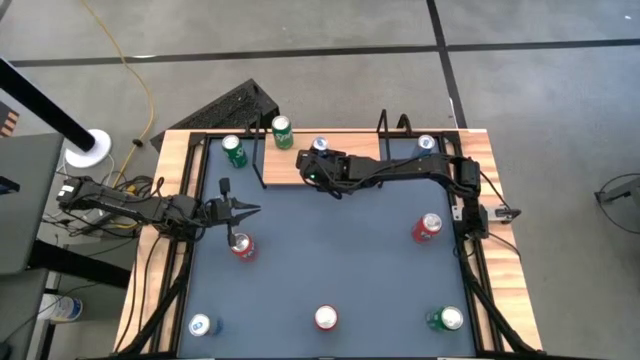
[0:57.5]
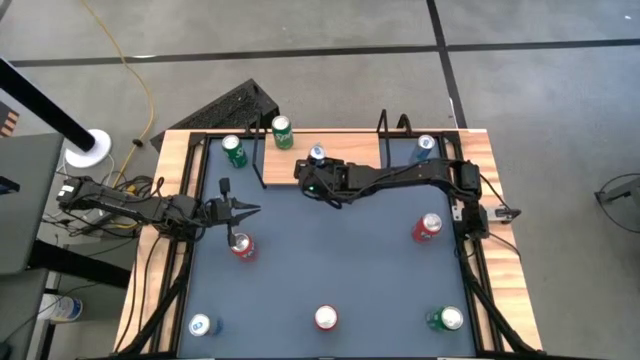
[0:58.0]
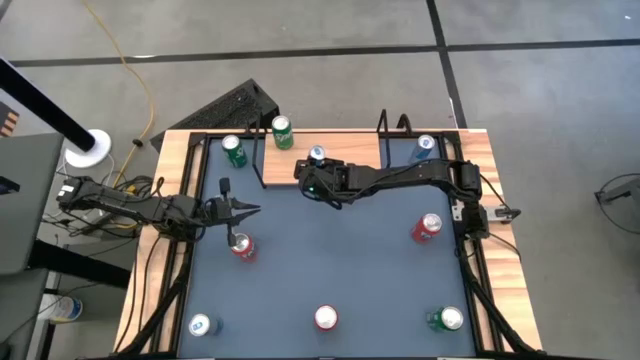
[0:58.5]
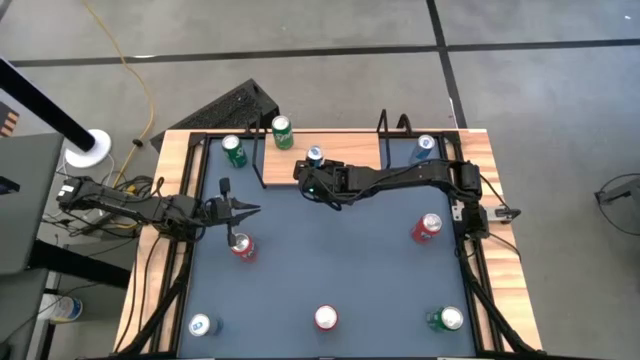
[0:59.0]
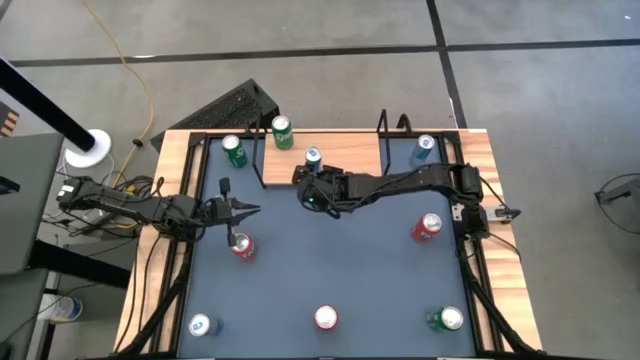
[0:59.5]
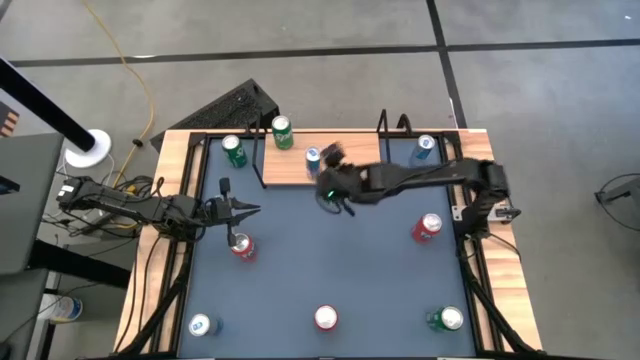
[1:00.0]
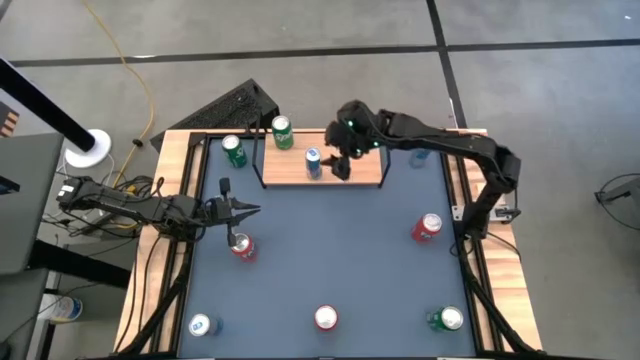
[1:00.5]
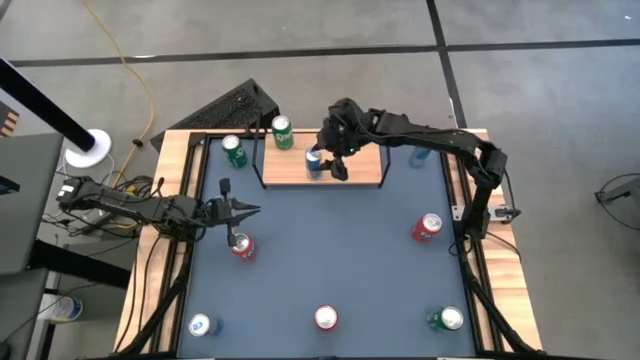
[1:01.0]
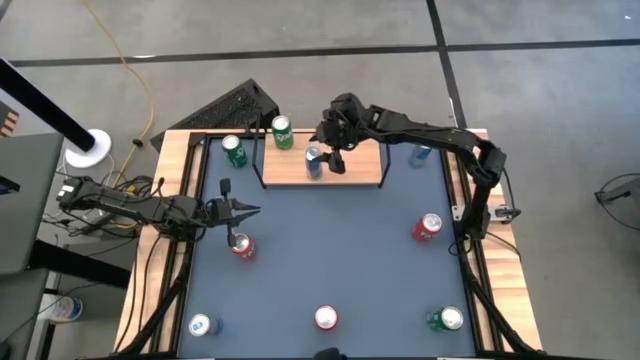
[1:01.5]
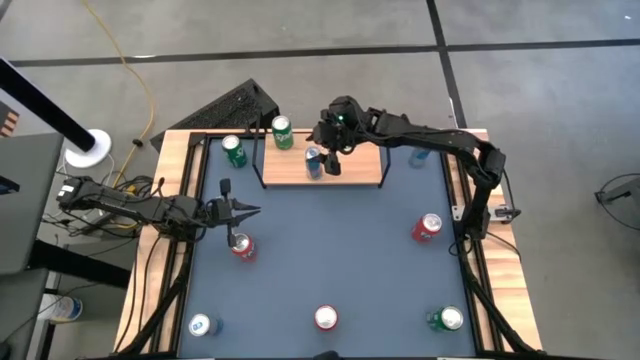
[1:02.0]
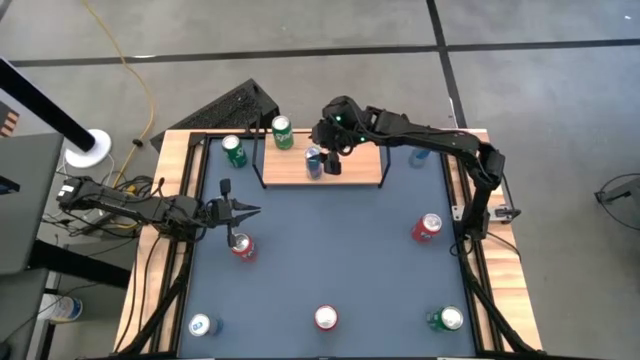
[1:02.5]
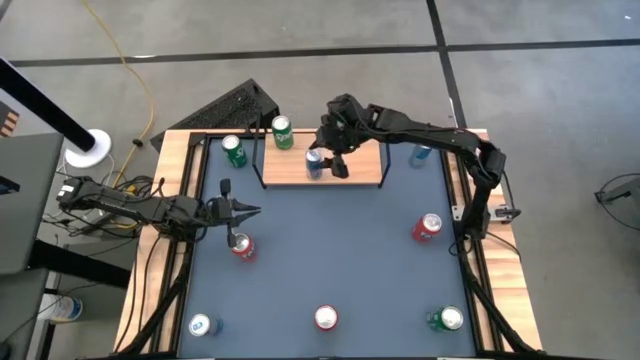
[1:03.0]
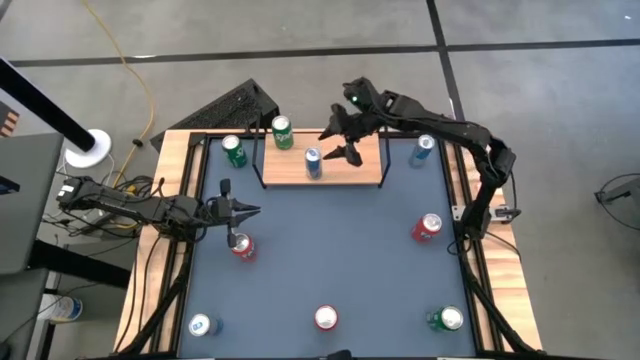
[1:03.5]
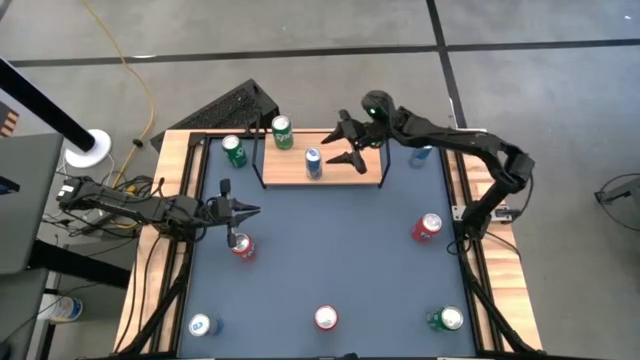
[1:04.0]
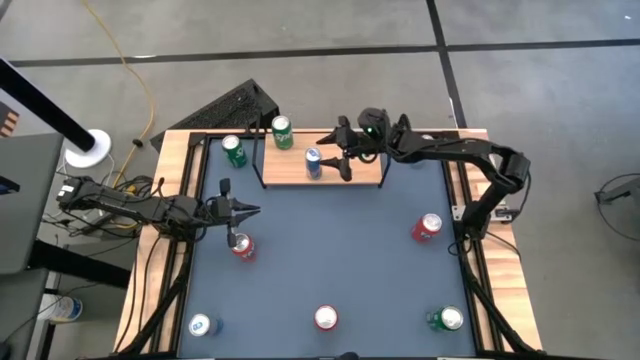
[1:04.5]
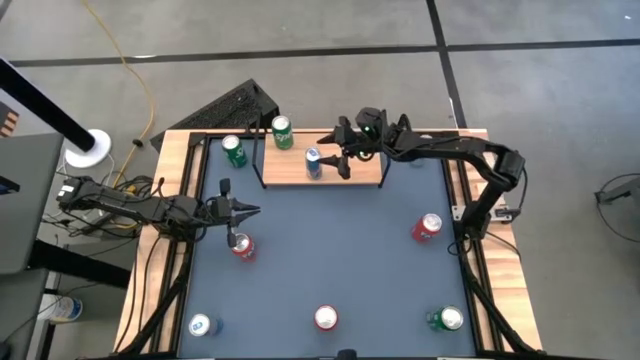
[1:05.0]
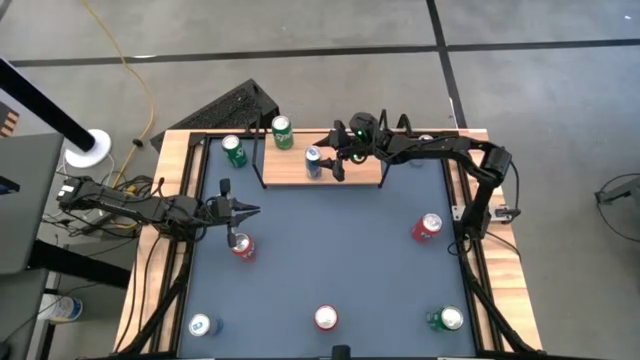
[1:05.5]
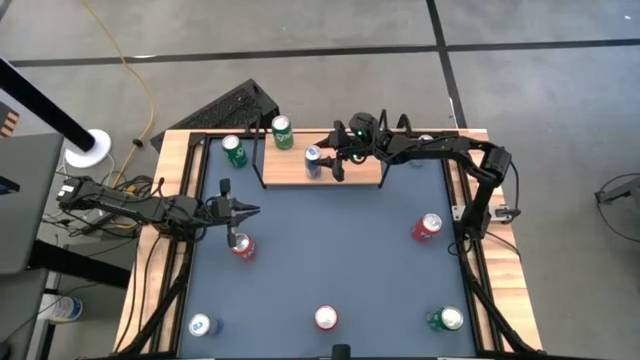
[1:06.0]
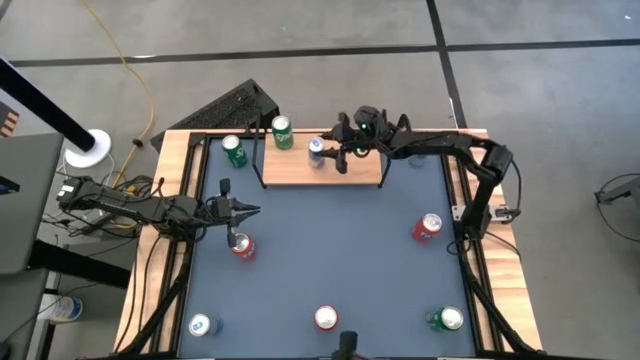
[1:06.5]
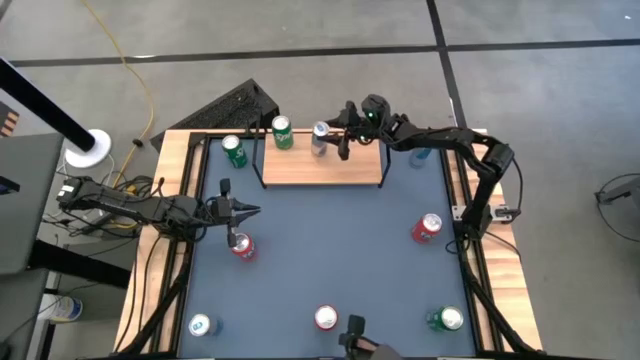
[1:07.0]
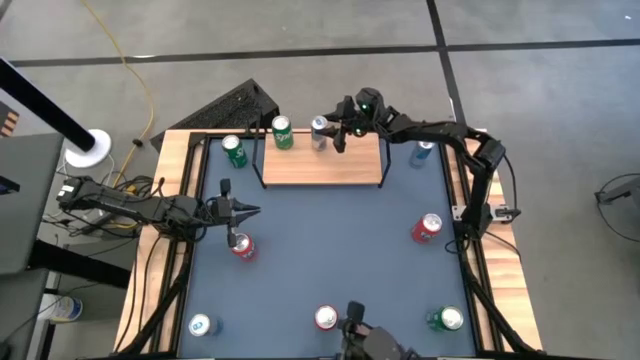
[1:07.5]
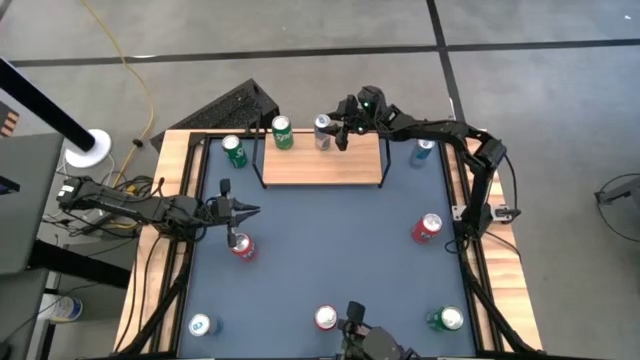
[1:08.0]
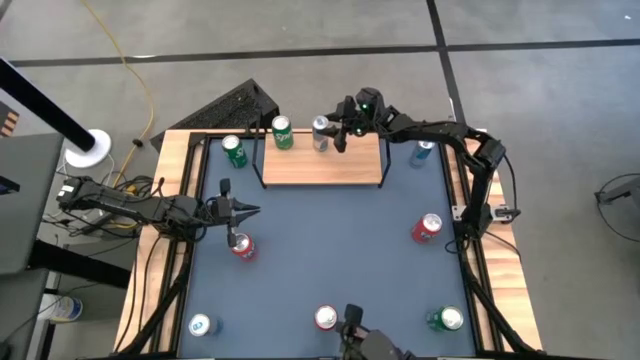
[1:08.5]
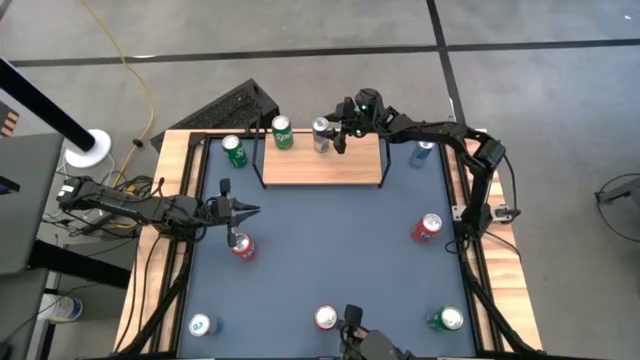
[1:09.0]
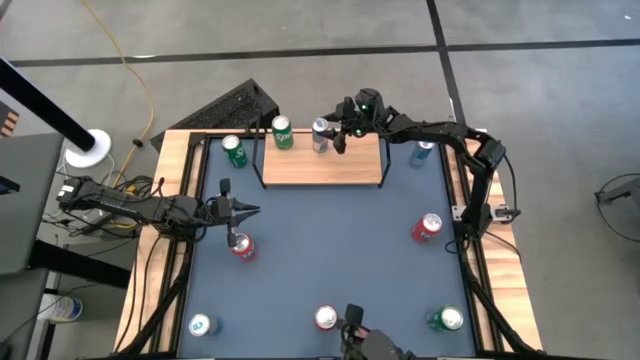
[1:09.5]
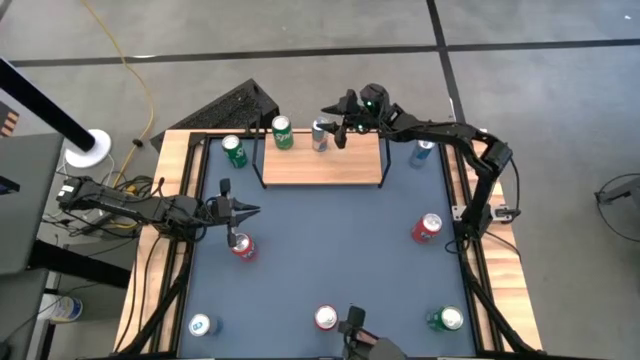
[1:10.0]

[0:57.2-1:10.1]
Task: Place canned beverage on shelf
Put the middle blue soda can on the shelf

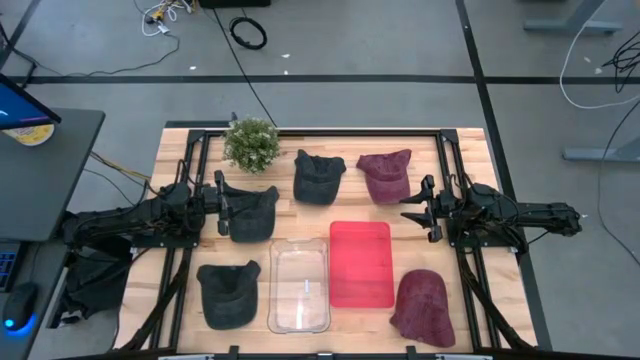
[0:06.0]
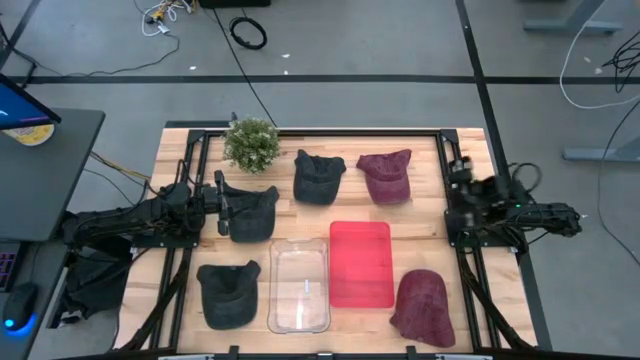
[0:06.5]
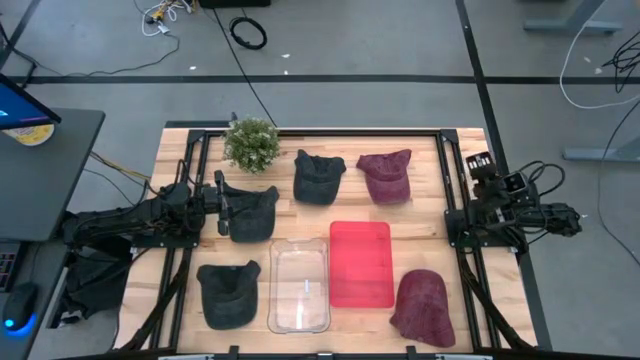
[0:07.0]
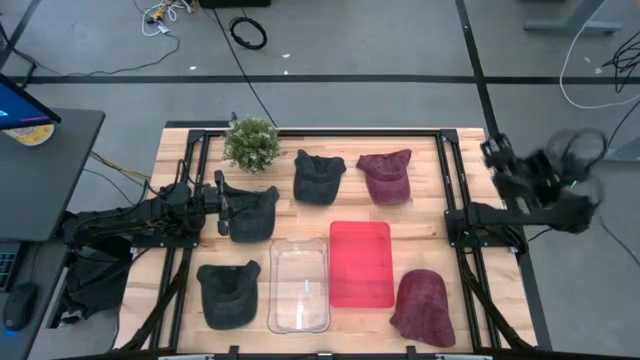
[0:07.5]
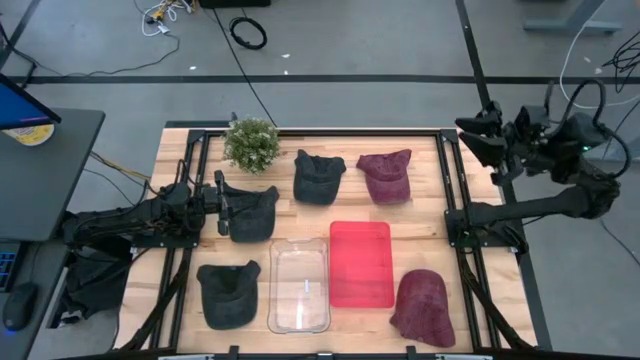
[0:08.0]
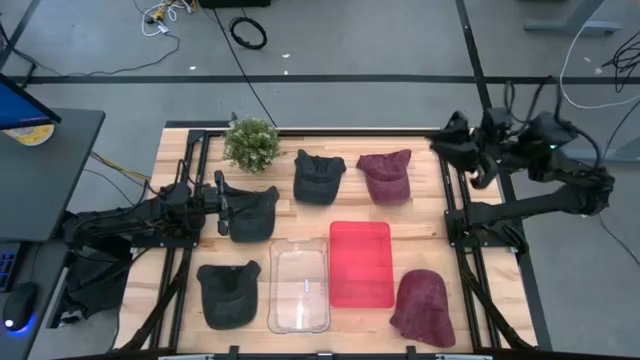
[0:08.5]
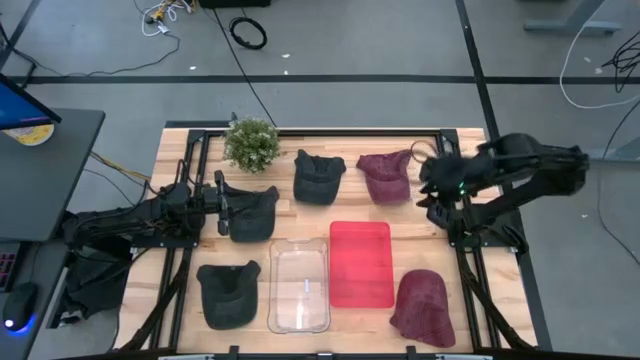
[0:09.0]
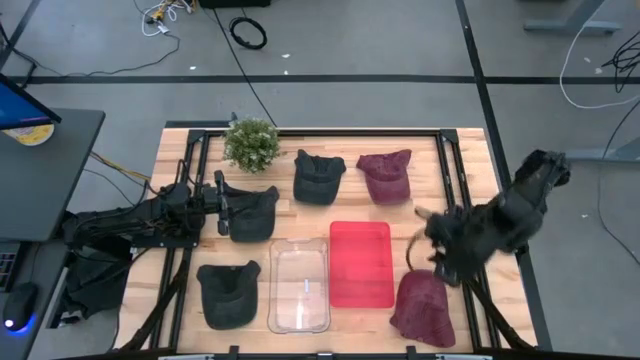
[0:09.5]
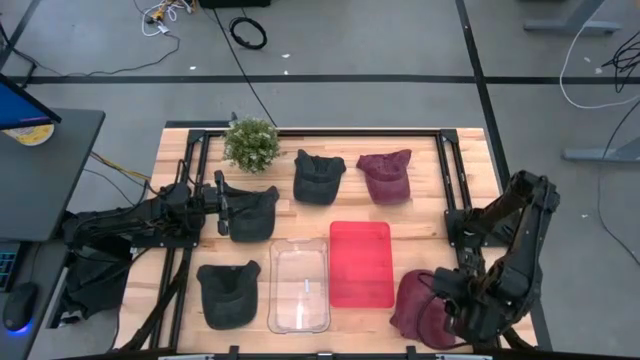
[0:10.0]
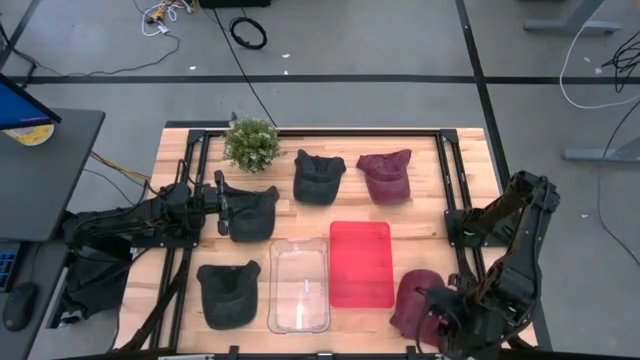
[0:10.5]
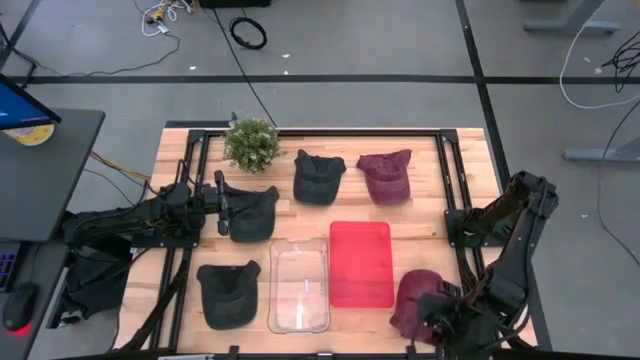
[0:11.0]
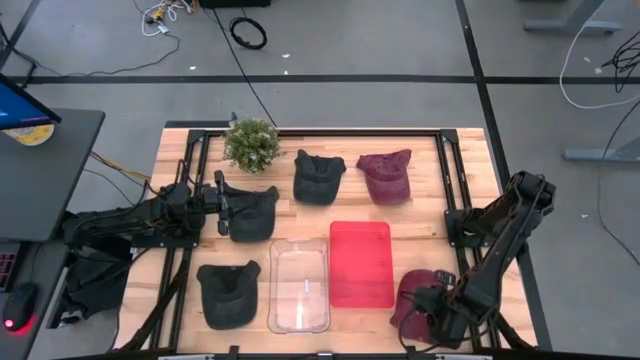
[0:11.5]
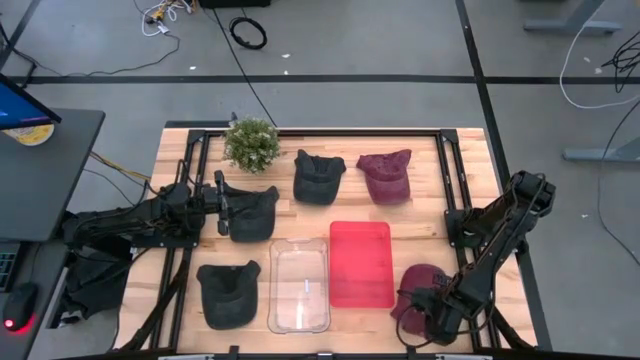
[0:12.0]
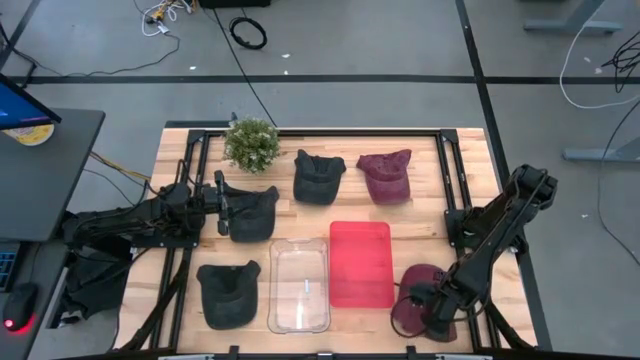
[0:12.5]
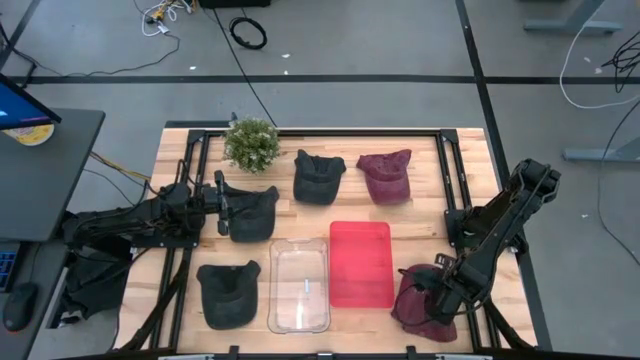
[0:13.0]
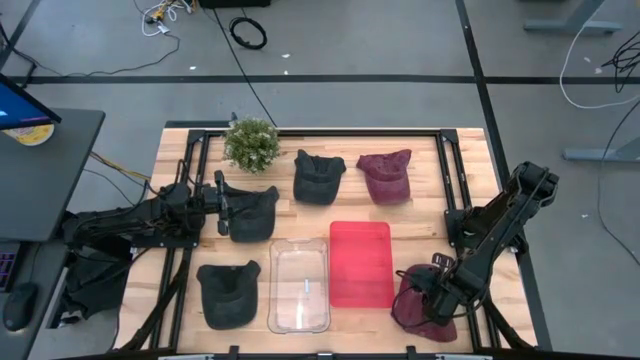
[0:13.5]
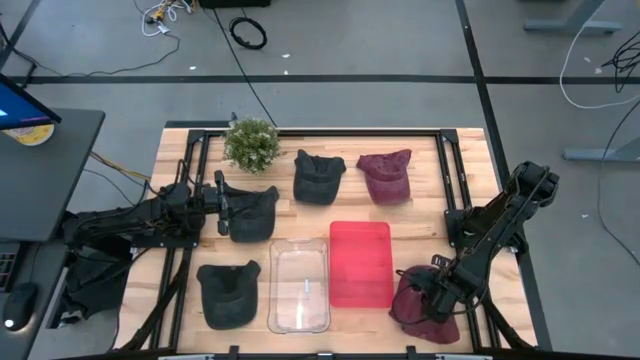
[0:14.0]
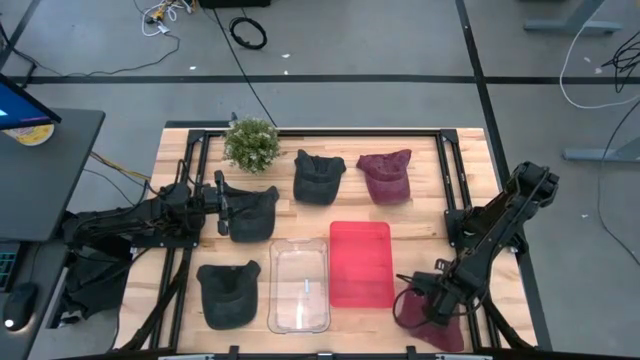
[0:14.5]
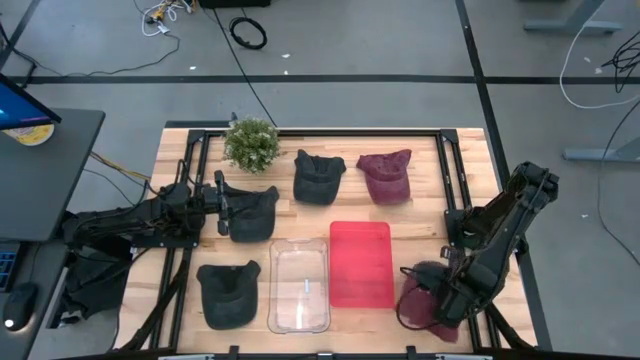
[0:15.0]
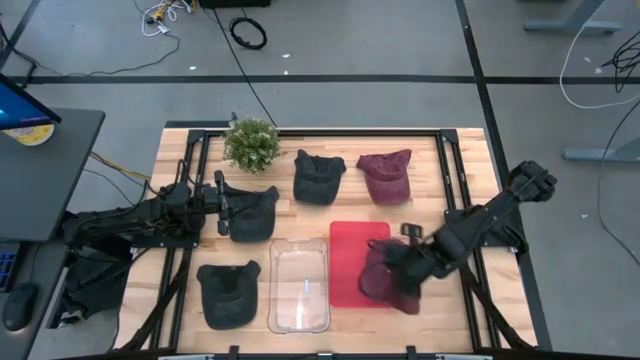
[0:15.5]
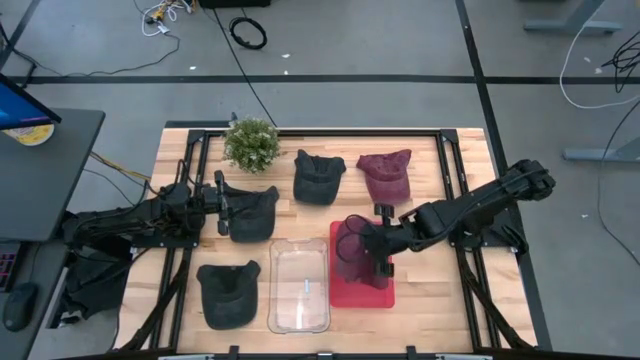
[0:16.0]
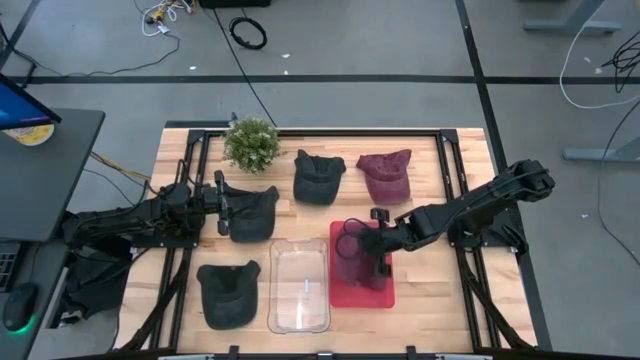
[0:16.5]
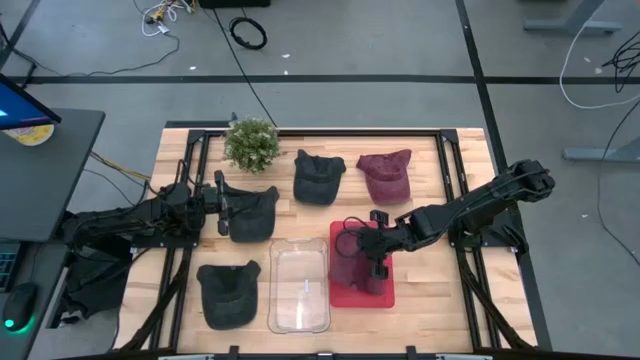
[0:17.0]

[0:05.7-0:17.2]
Task: Pick & Place hat
Put the bottom red cap into the red bin
